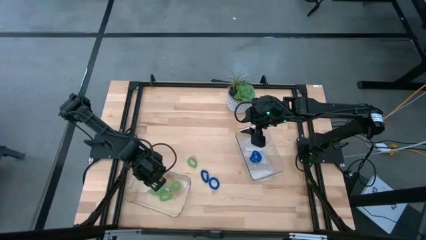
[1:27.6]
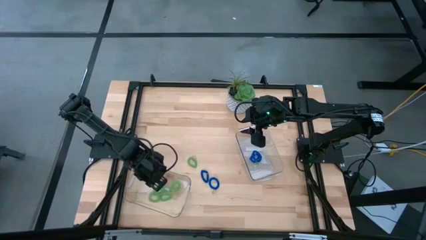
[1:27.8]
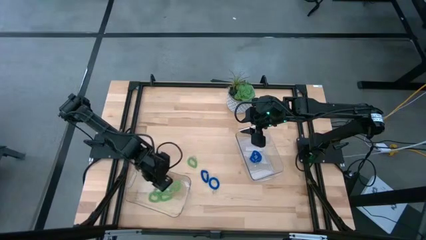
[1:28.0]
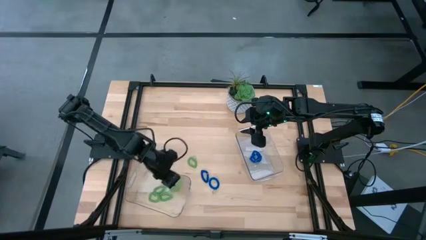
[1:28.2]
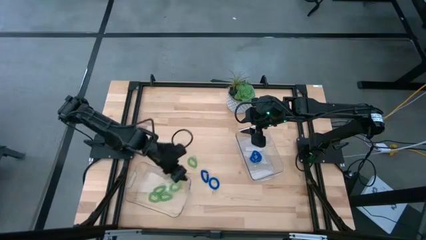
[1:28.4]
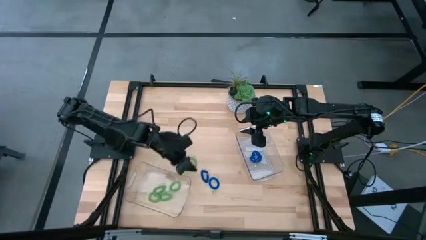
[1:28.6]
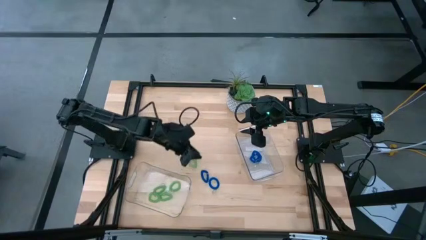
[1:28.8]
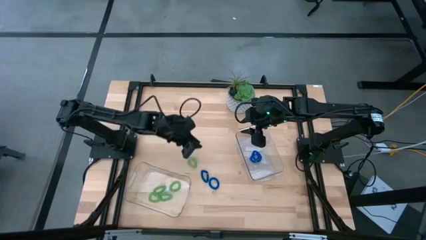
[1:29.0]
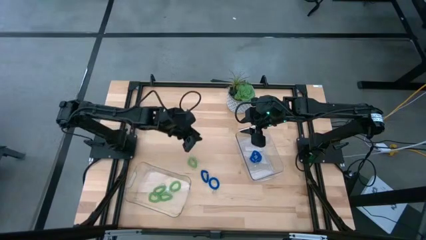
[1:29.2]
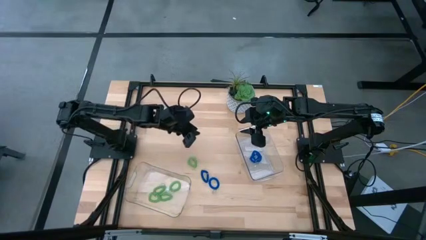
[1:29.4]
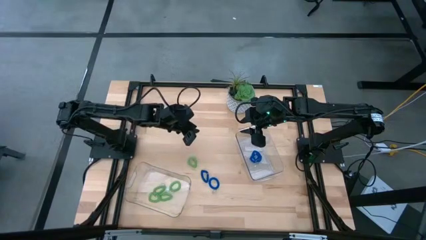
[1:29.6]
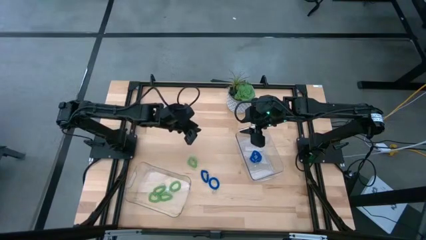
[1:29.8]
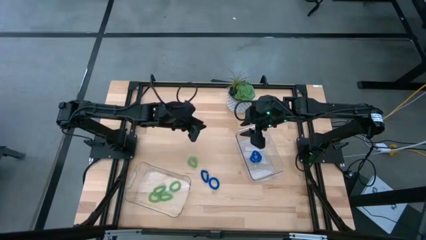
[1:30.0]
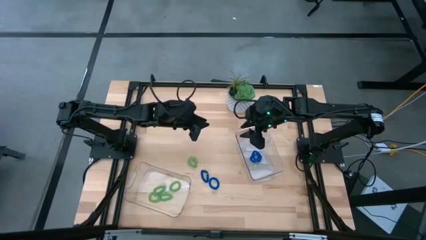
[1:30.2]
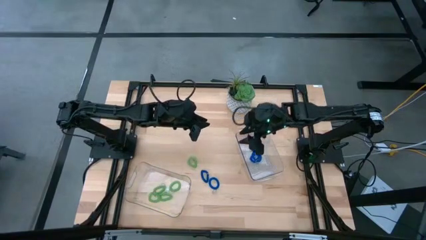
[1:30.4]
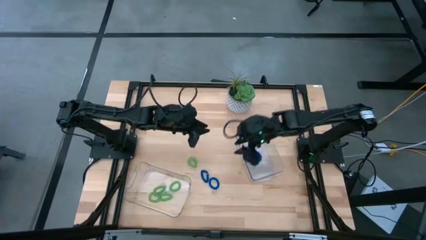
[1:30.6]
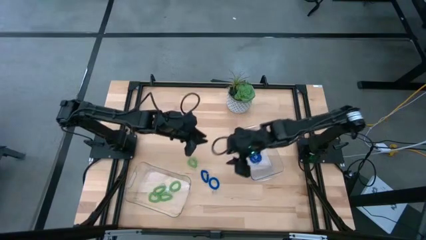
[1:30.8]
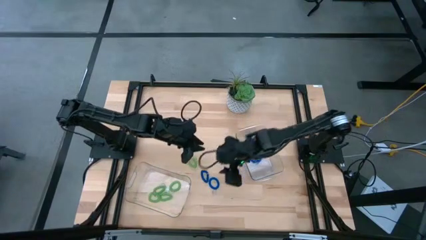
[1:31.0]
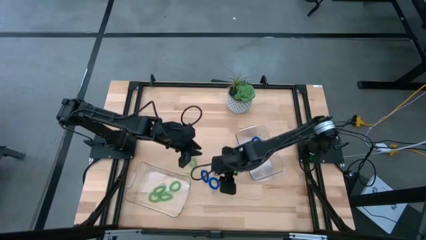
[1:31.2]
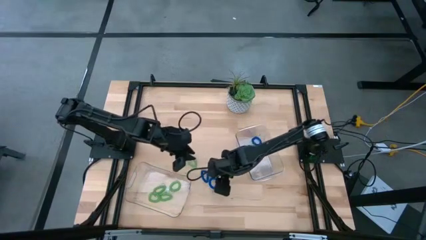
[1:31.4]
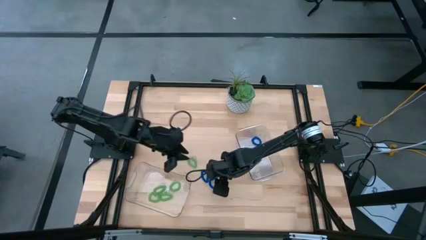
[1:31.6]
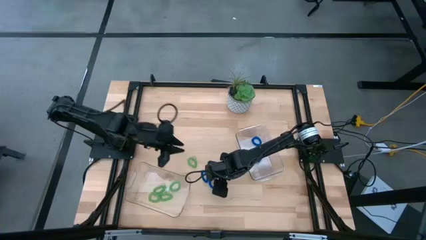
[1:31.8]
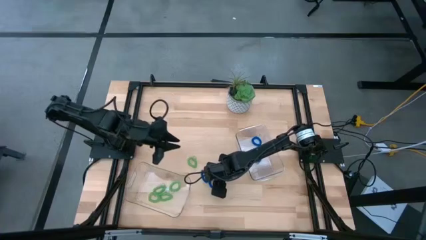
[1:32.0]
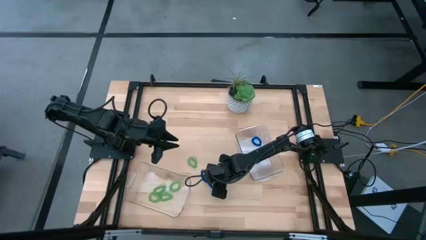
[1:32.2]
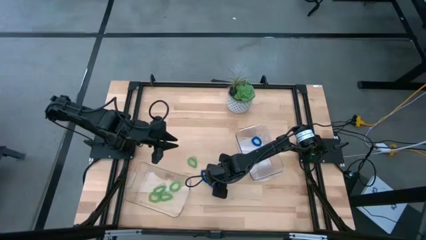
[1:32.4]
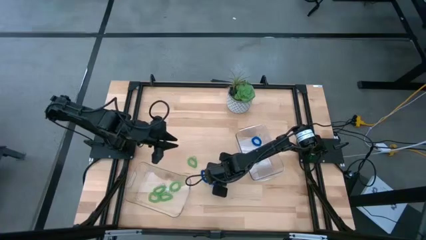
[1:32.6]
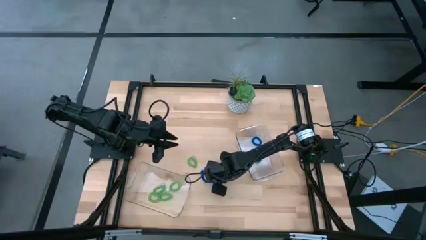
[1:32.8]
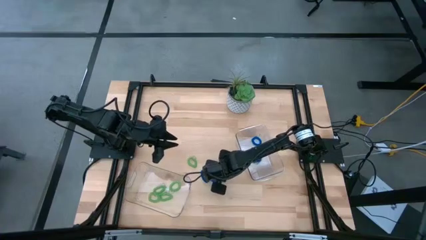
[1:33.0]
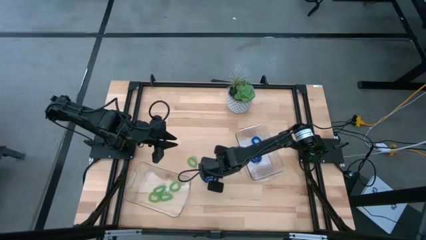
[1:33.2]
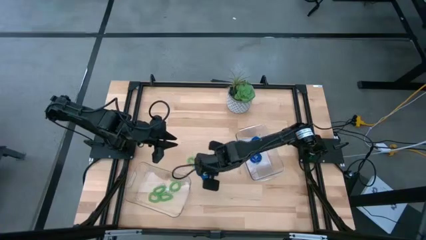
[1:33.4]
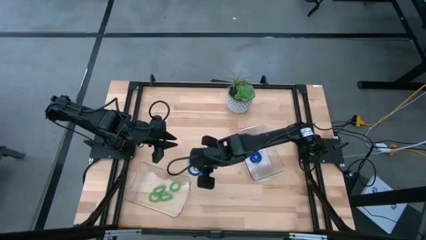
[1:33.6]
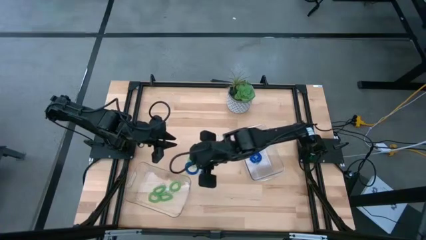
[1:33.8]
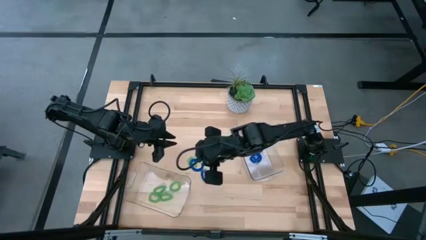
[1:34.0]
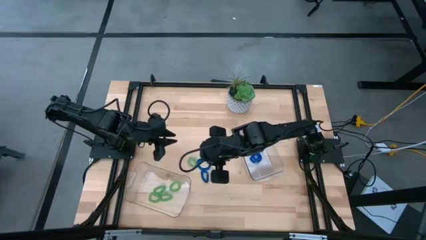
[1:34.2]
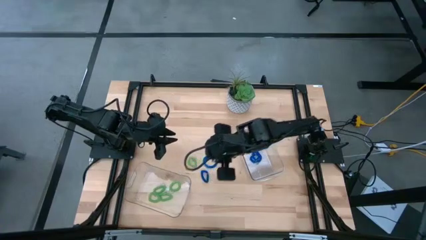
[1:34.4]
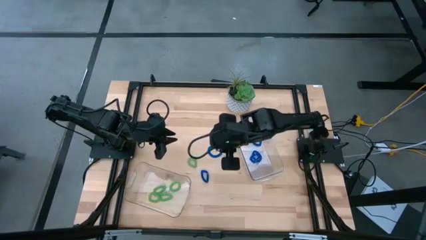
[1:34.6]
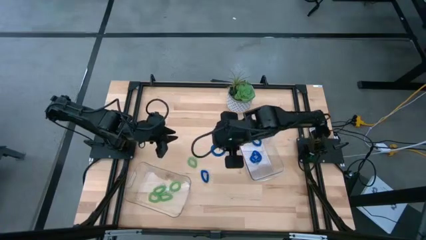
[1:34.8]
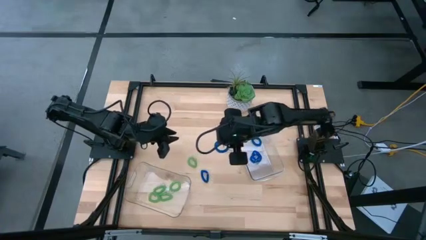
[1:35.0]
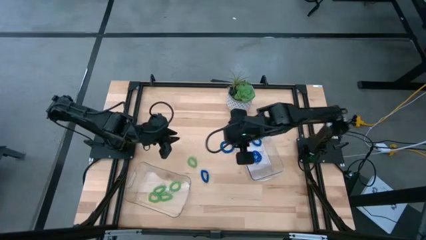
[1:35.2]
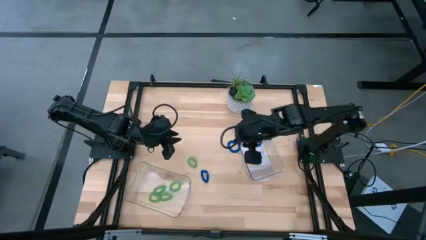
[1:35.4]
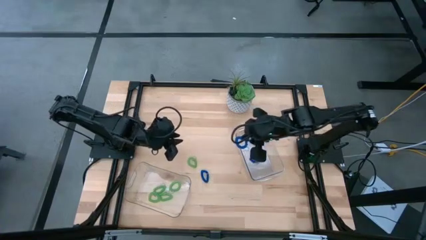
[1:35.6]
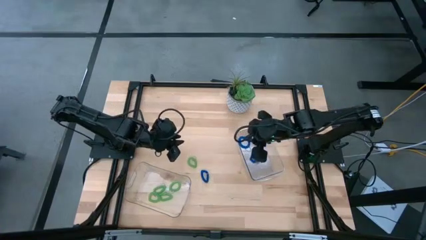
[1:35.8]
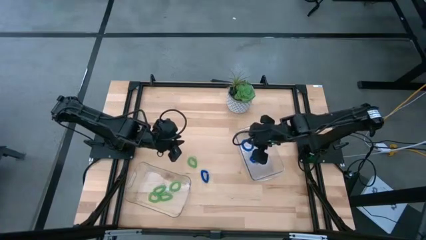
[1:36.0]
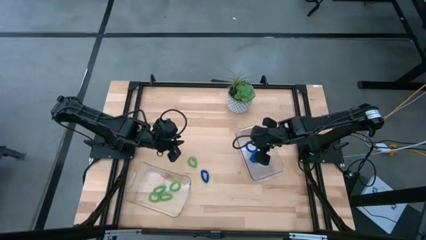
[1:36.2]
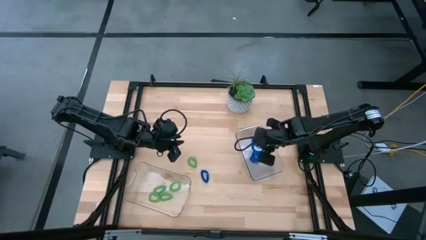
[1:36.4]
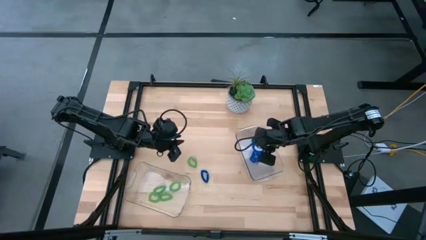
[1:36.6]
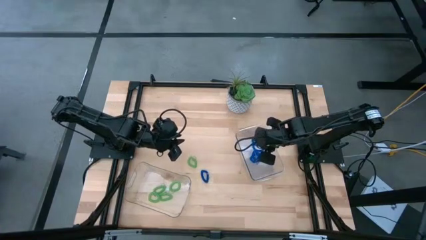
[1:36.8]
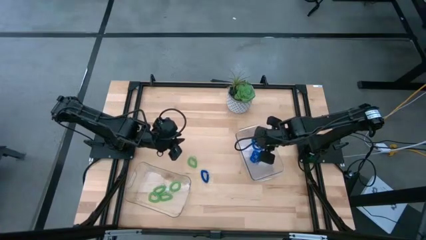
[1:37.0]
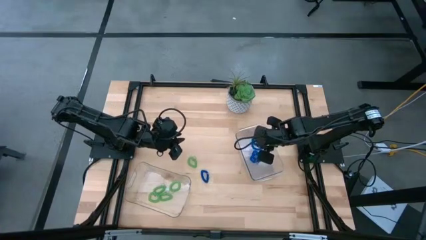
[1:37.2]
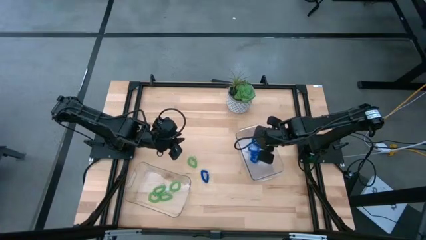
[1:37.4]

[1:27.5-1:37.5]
Task: Sort spring keychains
Put the blue spring keychain into the right transparent bin

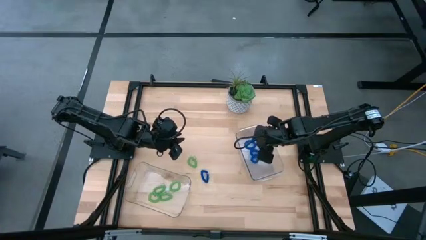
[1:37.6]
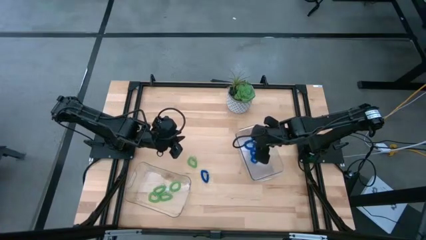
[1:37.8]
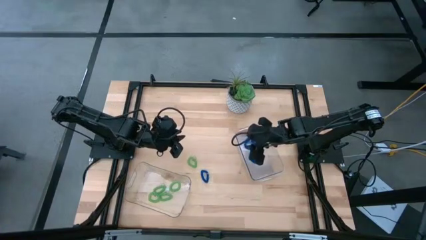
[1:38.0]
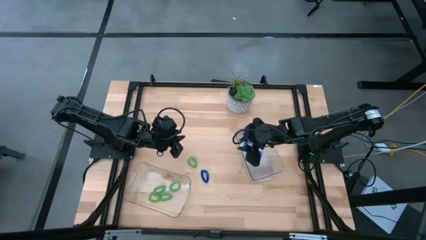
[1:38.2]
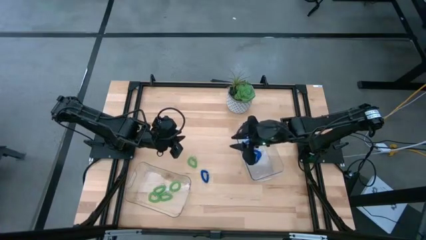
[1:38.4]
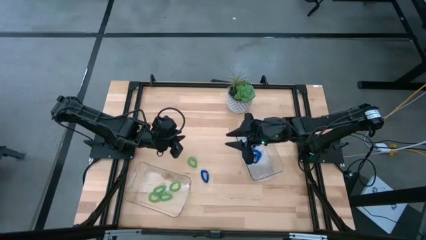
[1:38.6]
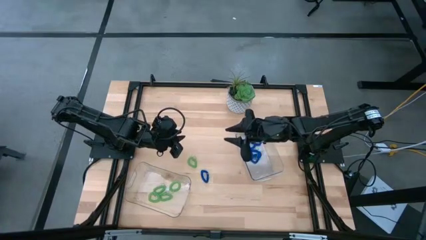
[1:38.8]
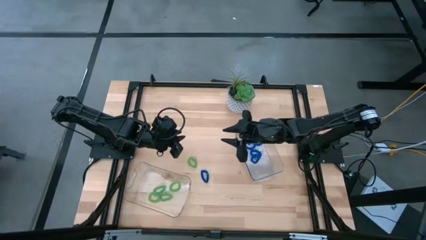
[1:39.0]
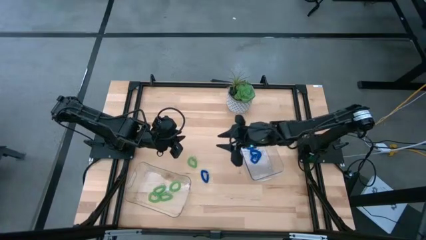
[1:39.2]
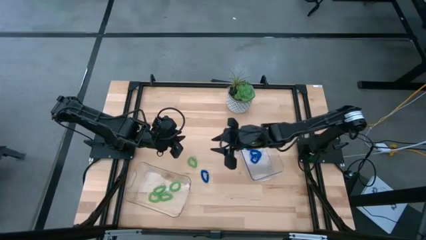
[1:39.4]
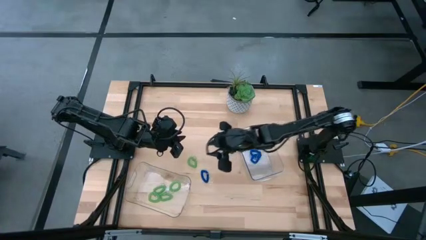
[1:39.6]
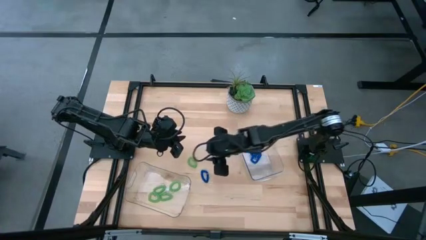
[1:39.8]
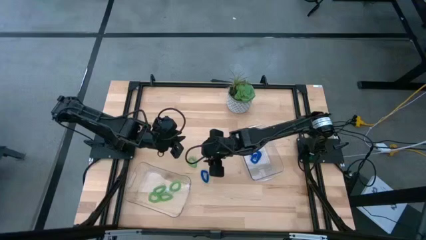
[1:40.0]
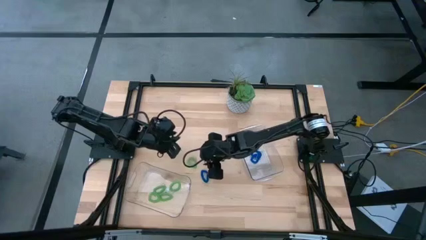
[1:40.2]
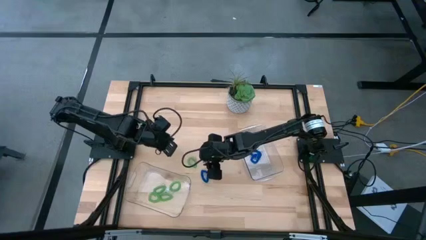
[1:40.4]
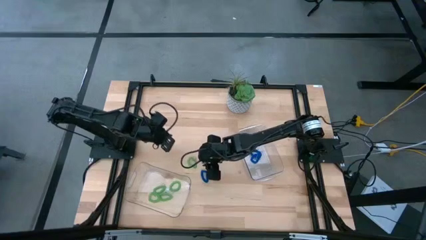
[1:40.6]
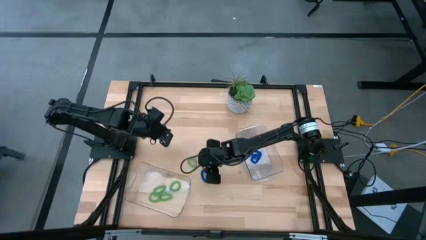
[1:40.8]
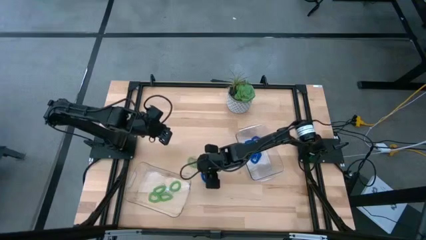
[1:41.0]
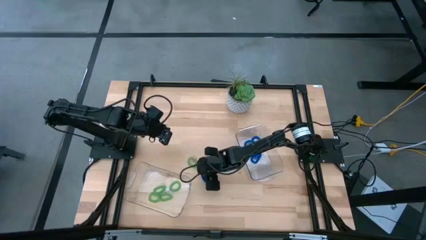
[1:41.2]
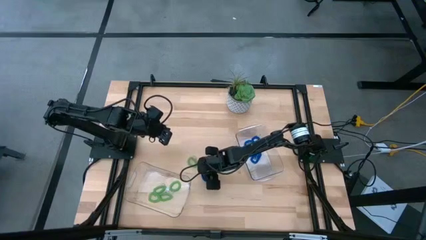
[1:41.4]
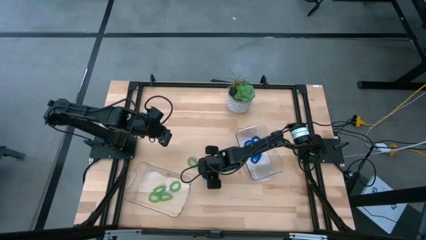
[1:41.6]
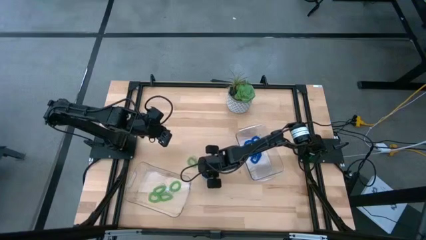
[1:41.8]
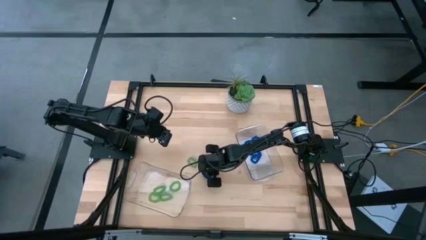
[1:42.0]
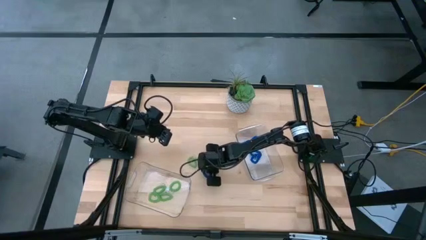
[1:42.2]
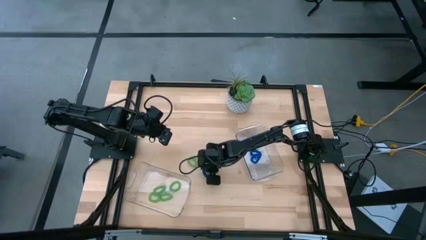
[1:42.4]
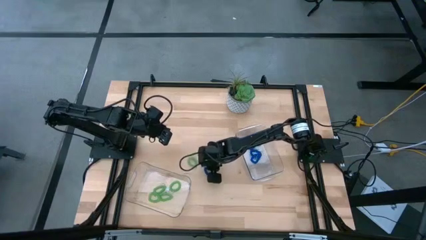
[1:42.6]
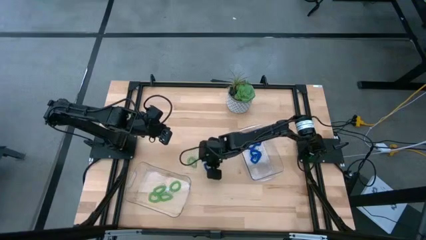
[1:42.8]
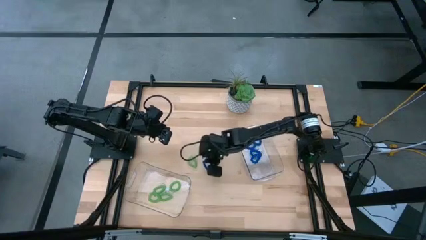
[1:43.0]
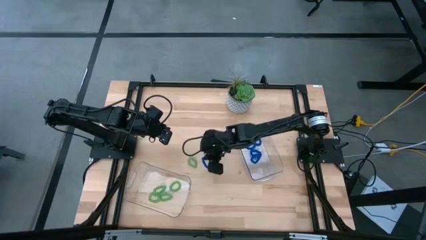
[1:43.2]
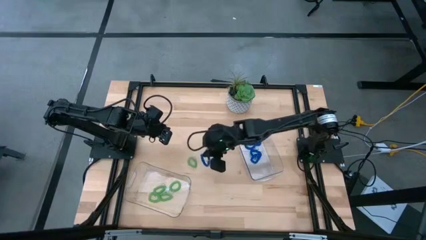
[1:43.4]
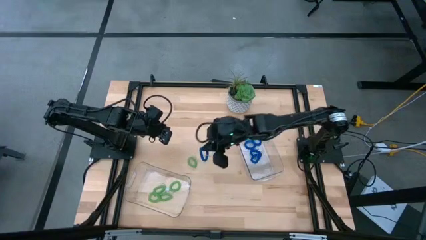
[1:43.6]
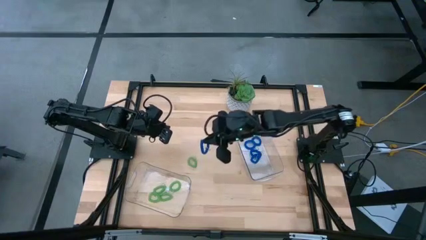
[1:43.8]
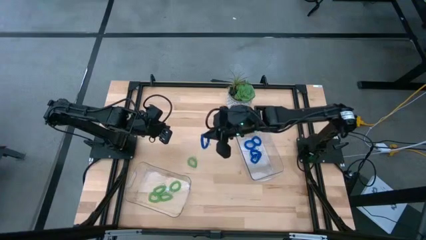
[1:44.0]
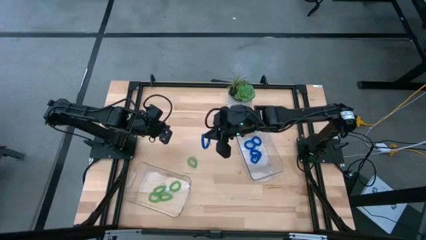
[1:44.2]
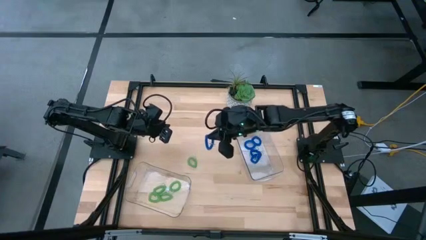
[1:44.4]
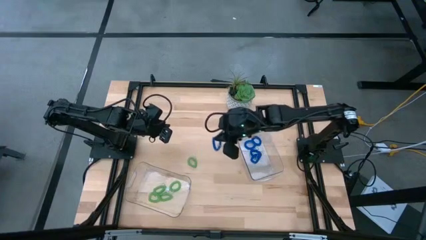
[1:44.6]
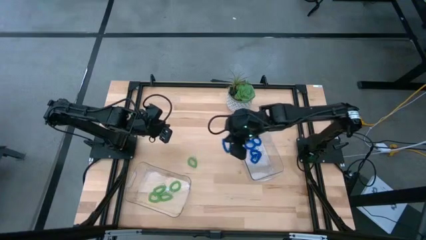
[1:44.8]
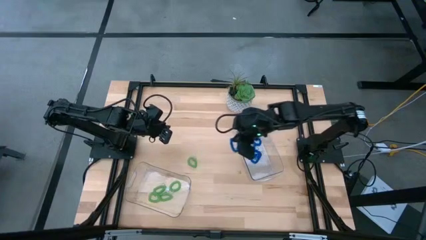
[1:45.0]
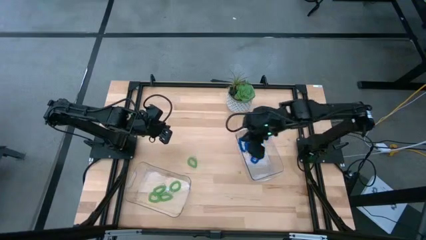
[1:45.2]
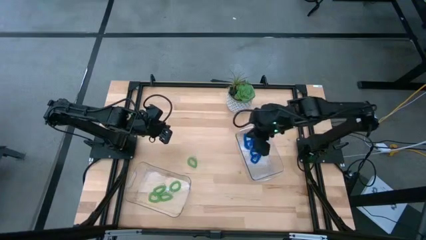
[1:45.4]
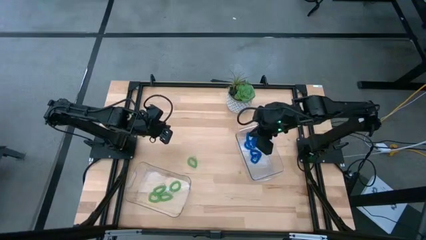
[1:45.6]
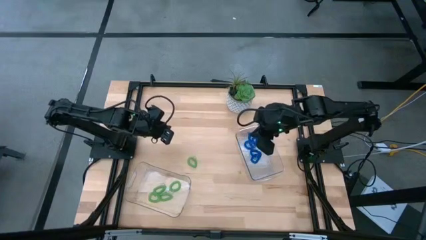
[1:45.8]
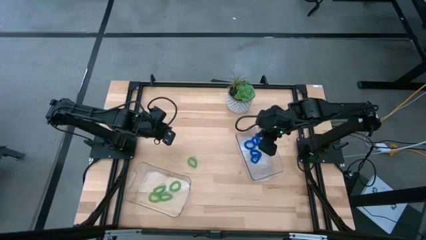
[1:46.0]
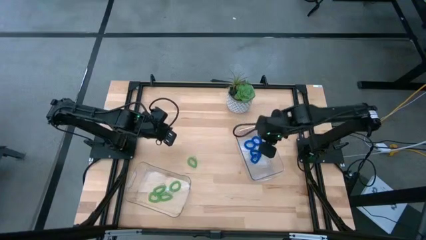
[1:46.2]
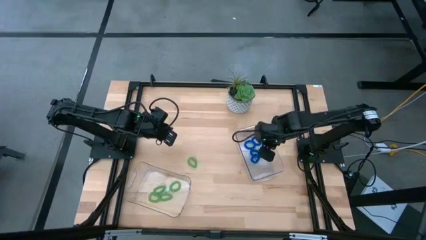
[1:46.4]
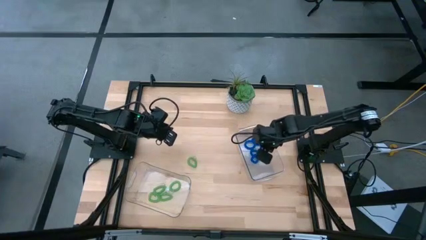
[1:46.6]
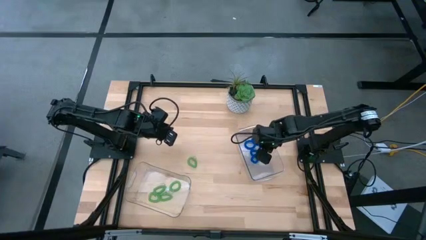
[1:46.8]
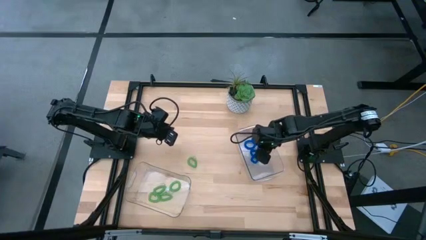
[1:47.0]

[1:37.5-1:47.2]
Put the blue spring keychain into the right transparent bin
